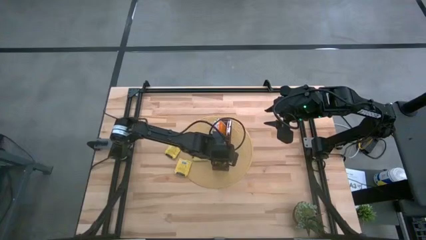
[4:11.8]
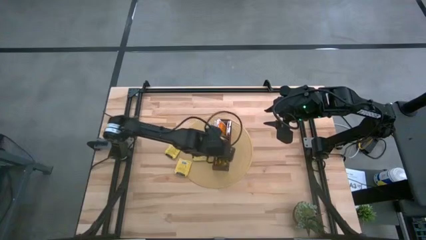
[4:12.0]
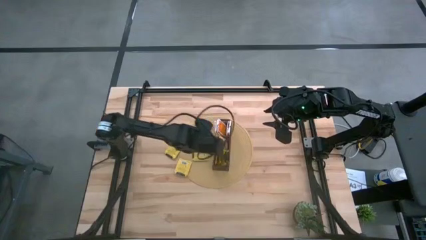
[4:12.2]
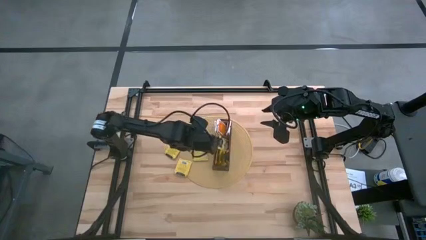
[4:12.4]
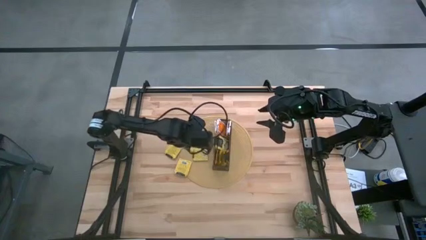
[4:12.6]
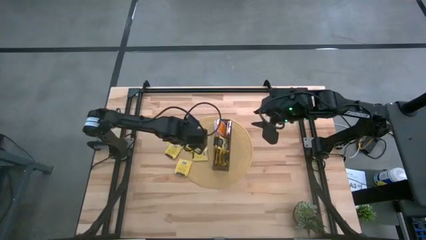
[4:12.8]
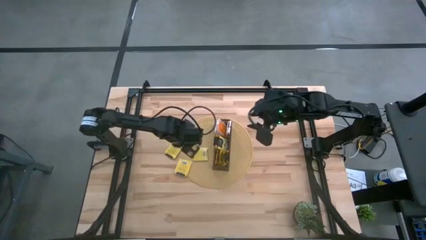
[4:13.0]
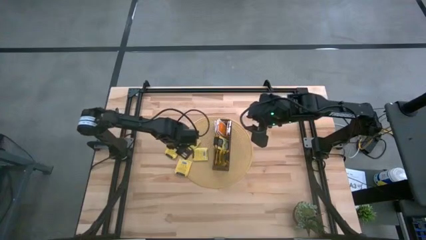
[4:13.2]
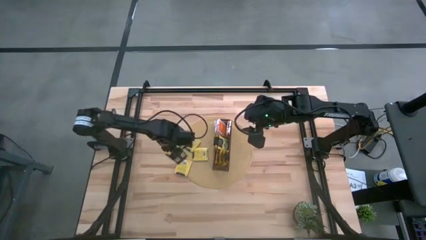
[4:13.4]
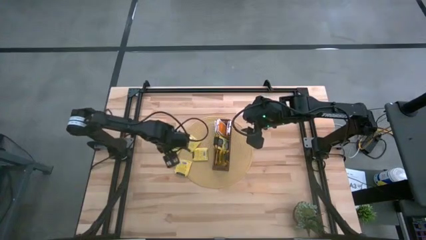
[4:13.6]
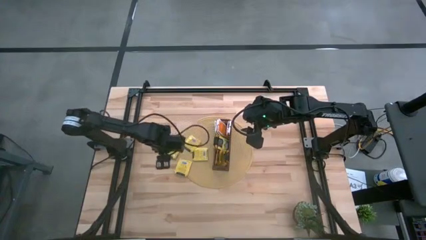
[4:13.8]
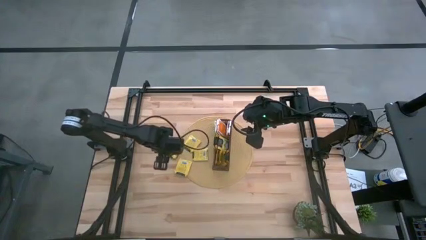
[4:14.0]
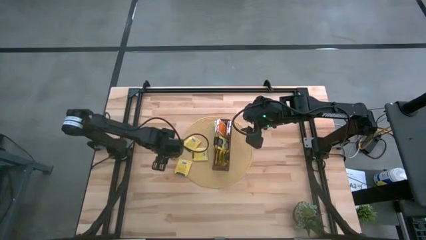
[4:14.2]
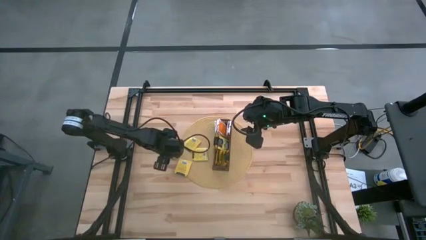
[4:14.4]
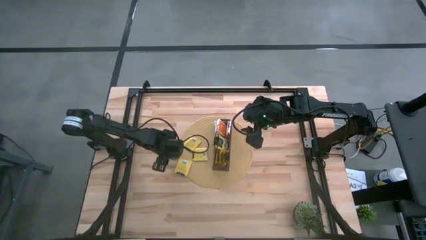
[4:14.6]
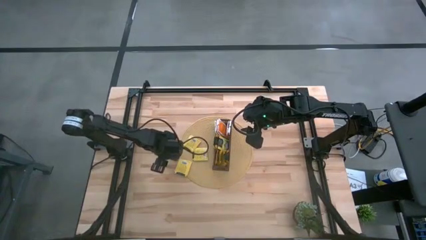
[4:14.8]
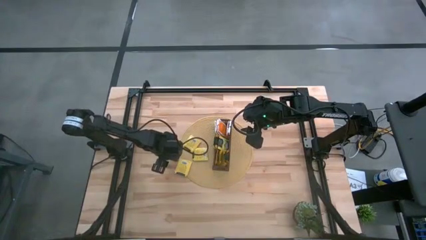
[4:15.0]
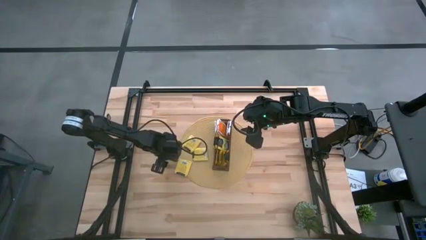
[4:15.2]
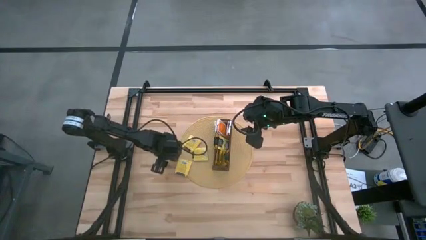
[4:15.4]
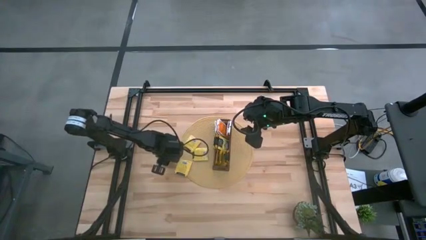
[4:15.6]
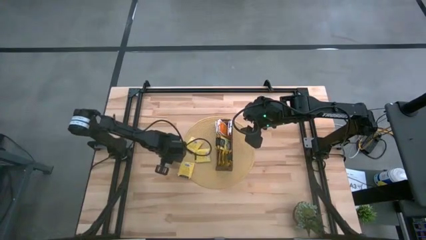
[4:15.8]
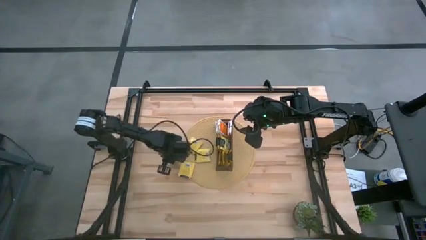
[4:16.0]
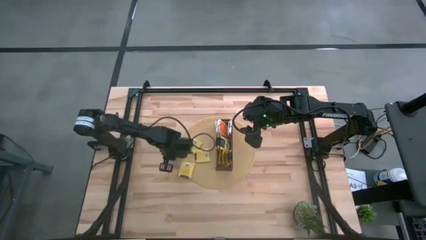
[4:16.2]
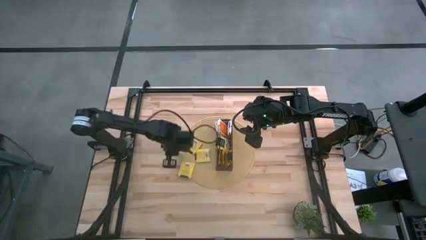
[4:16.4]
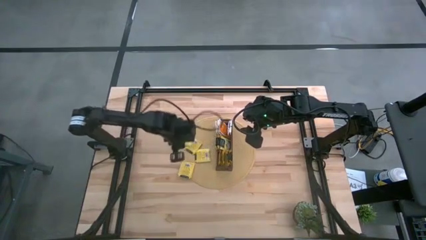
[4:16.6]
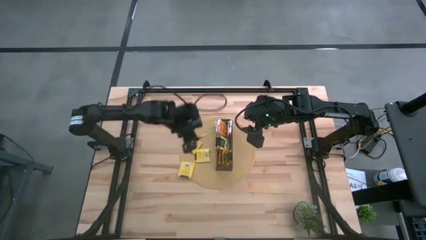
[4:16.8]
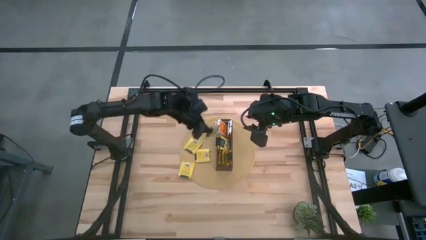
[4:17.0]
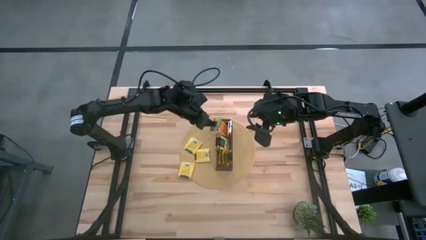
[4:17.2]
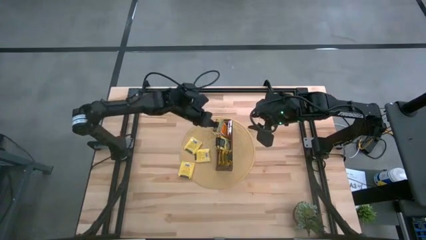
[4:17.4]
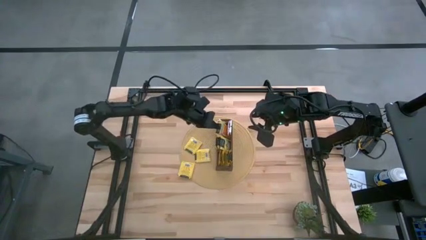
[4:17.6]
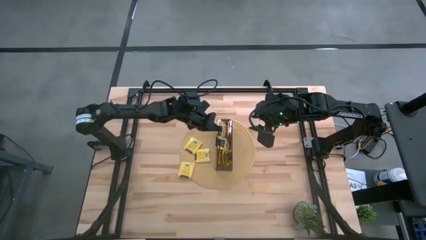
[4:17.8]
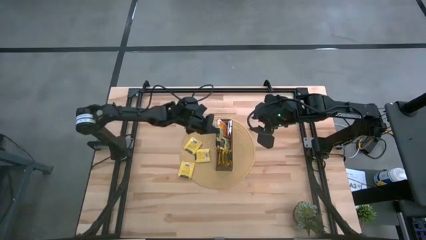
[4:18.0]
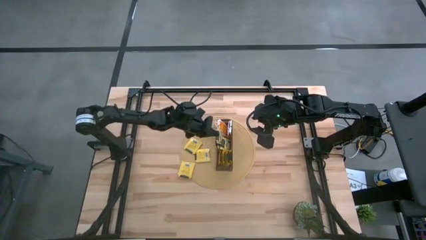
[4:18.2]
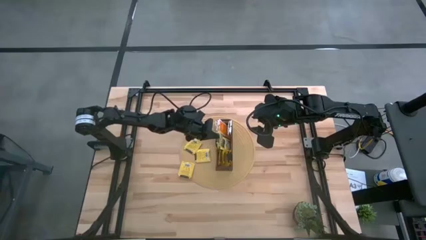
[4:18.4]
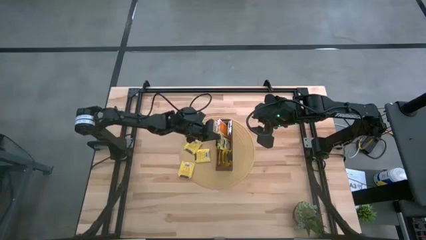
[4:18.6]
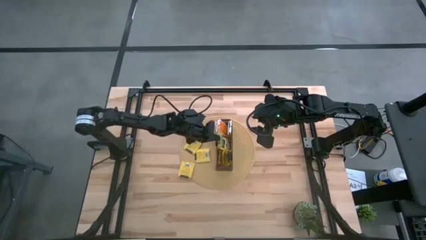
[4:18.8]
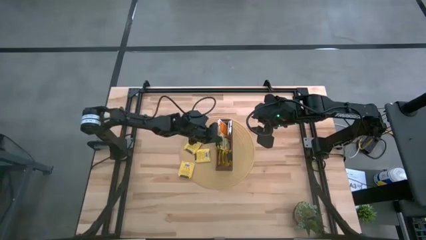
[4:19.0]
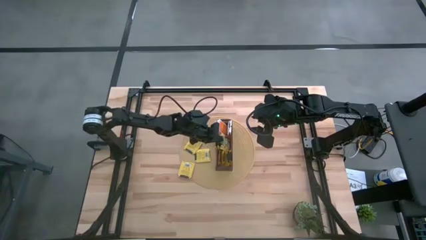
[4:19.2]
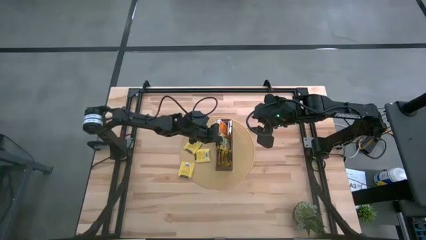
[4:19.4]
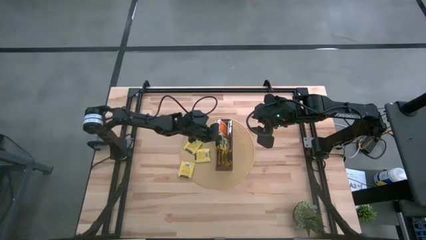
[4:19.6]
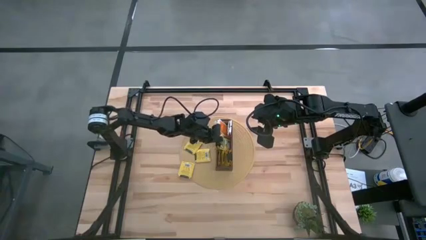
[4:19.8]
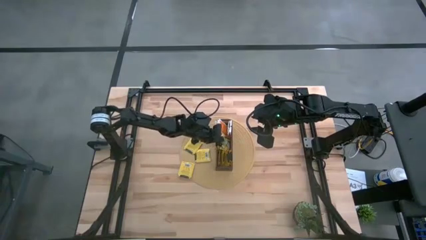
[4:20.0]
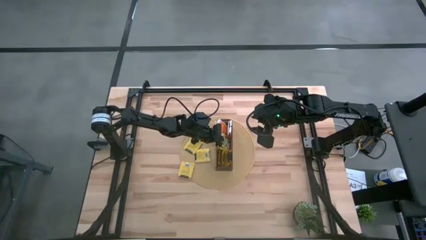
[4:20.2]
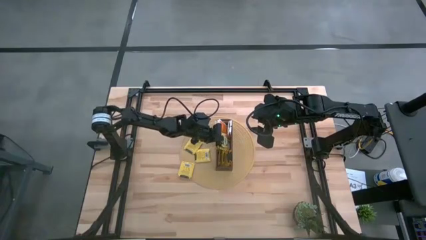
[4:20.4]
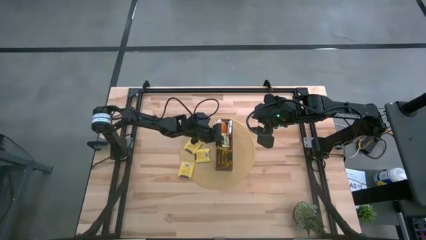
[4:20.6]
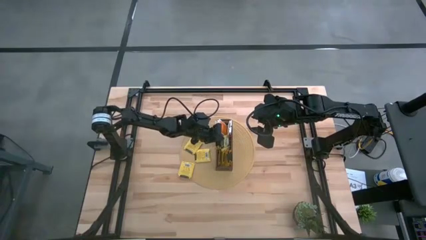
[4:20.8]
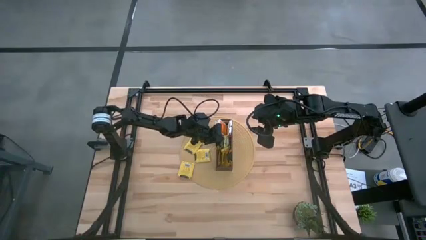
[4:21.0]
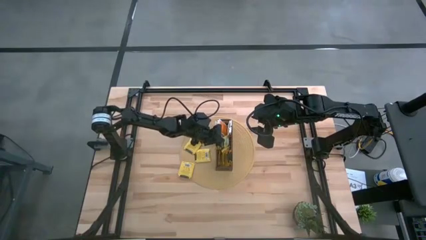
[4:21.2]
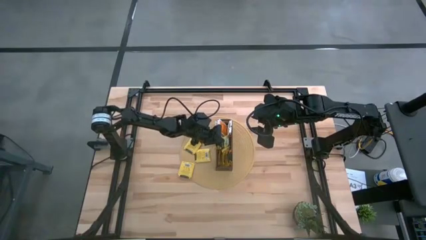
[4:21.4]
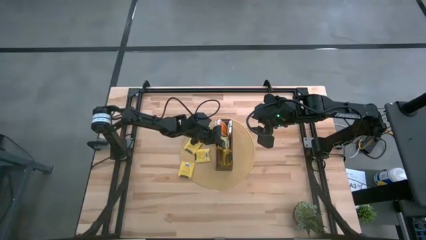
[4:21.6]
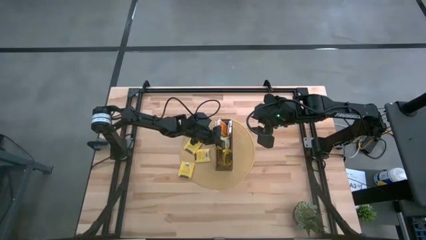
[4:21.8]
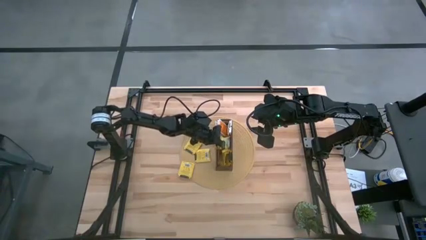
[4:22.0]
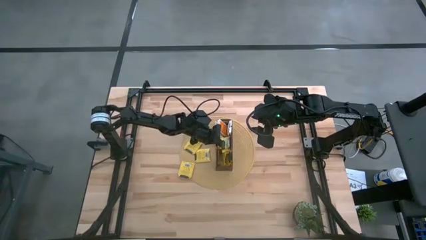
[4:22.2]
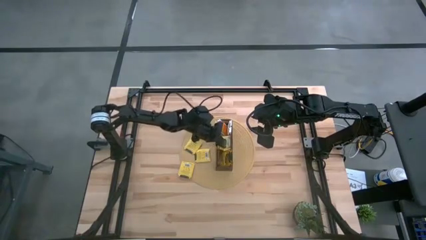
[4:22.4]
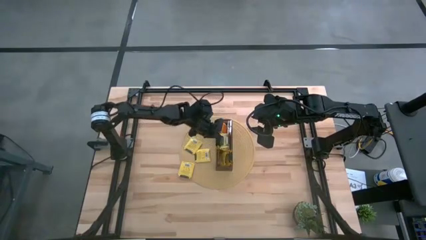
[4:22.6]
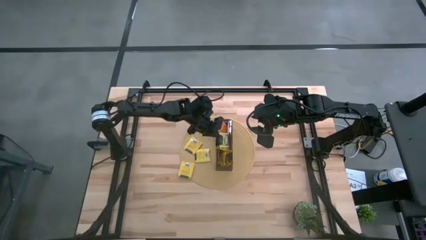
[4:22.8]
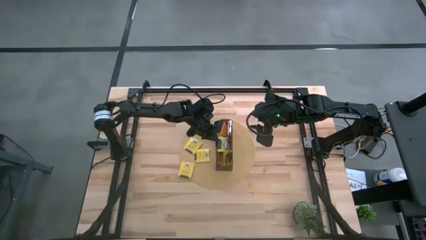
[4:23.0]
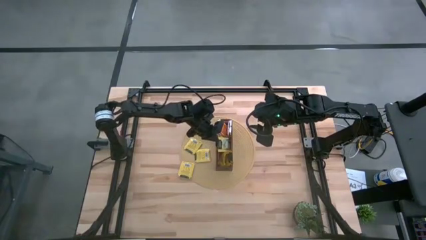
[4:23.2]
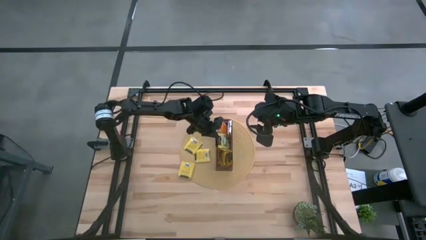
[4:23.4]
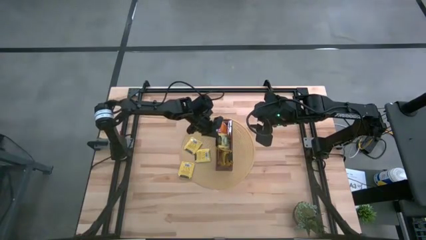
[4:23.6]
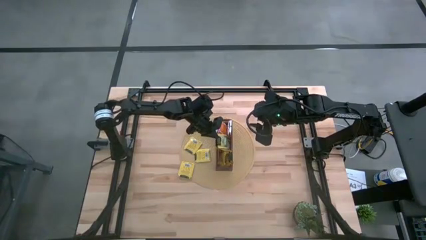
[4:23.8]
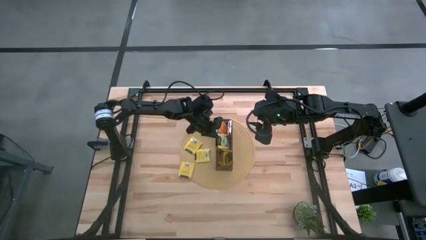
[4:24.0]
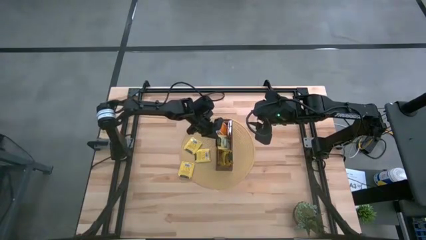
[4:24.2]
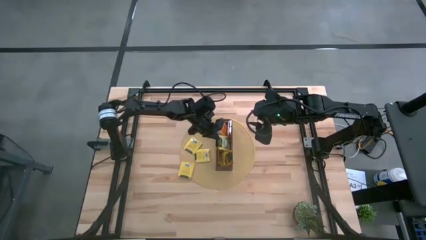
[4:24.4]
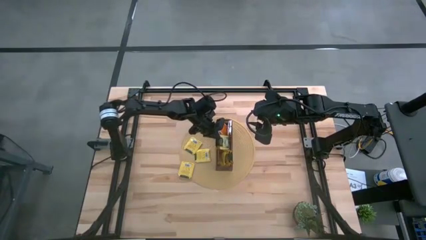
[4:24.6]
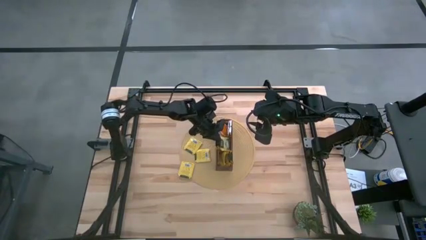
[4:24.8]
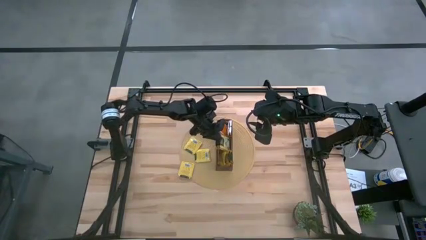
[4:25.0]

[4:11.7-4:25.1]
Task: Pick & Place Tea
Put the yellow tea bag into the middle section of the wooden organizer

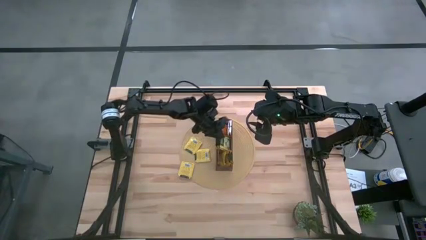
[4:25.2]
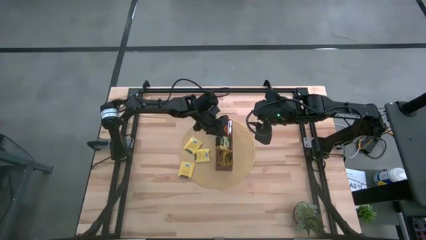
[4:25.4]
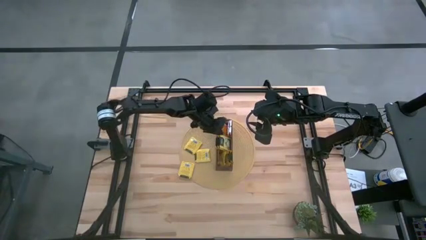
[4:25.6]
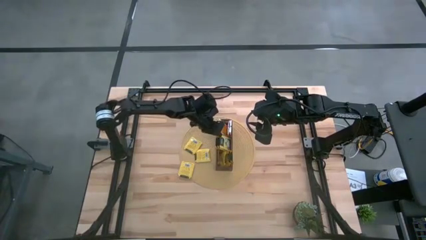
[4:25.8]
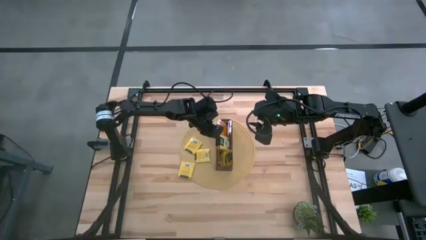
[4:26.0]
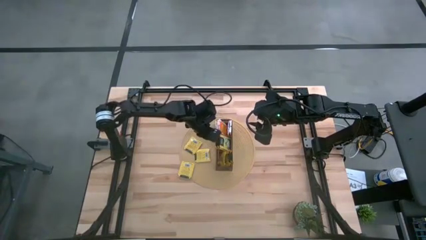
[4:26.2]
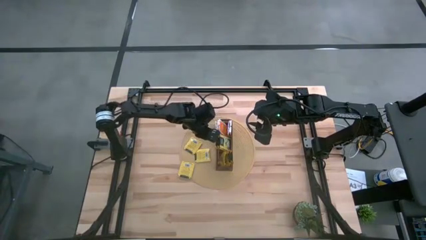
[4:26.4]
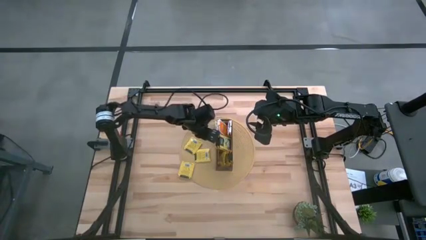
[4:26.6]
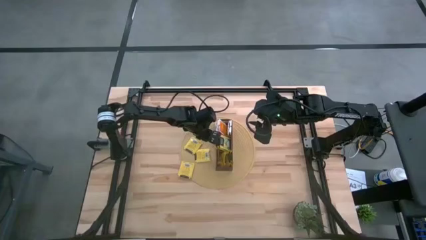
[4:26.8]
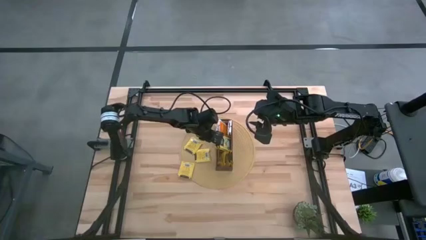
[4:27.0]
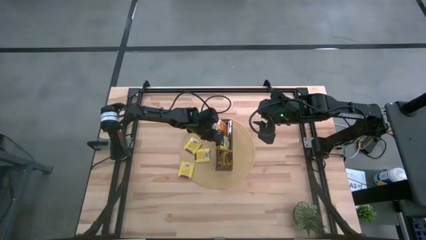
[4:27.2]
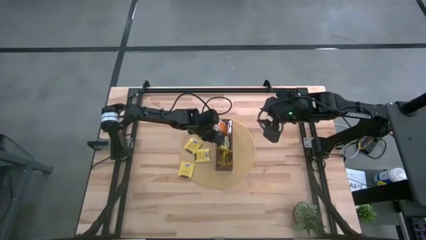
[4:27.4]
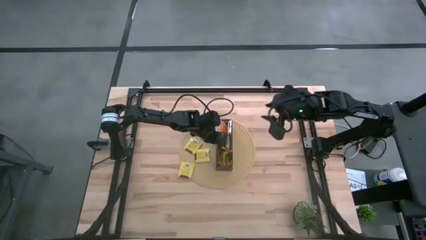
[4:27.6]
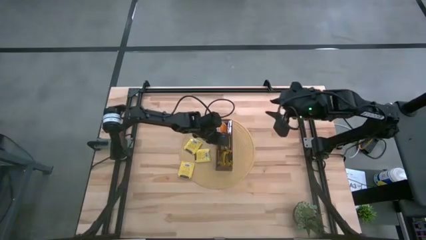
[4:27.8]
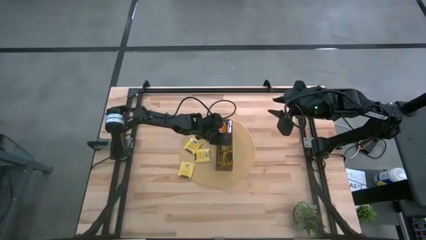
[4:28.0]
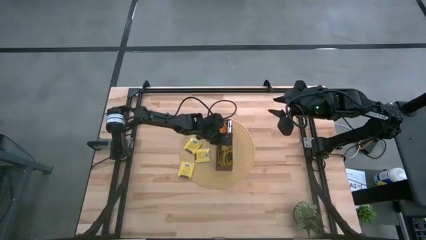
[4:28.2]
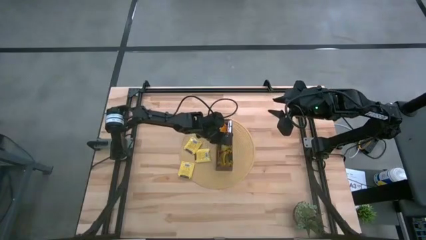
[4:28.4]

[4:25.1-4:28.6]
Adjust the yellow tea bags in the wooden organizer
